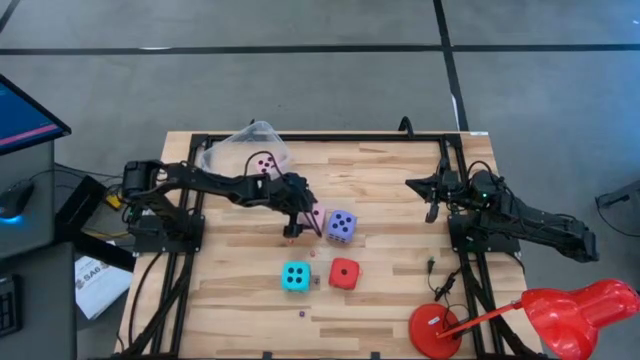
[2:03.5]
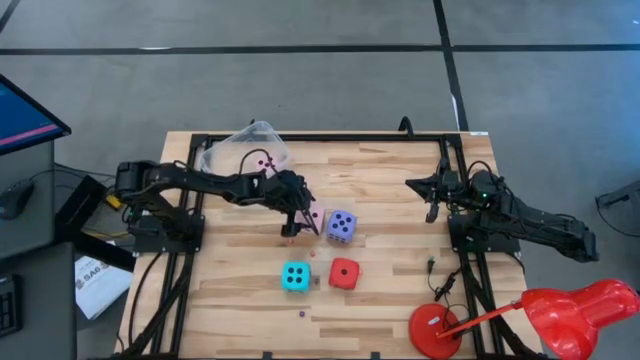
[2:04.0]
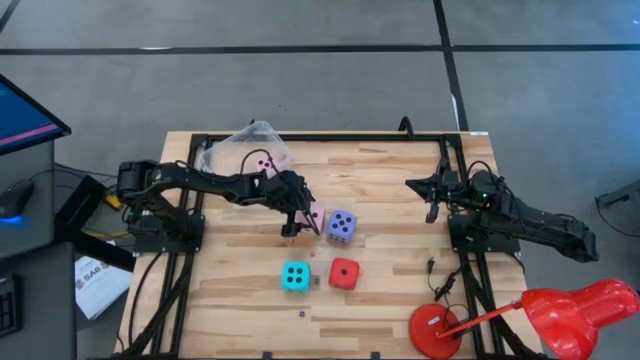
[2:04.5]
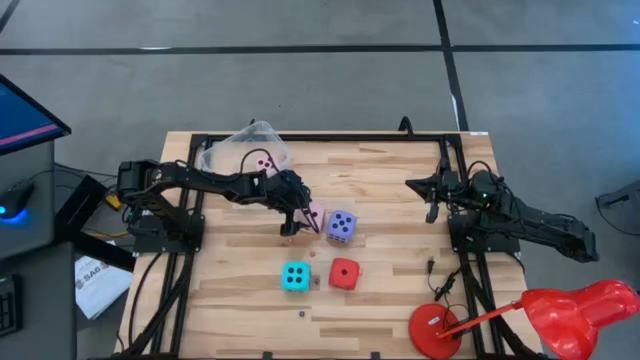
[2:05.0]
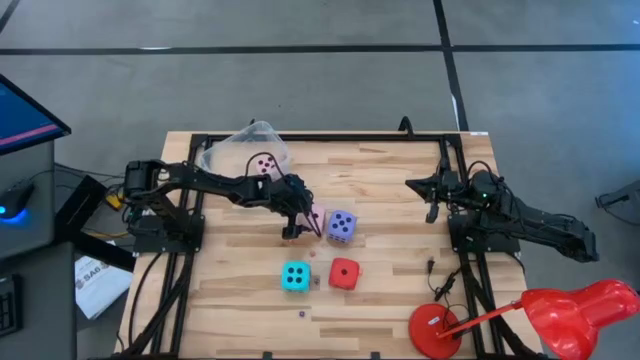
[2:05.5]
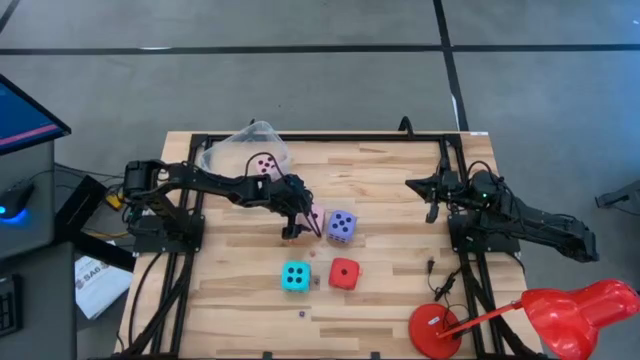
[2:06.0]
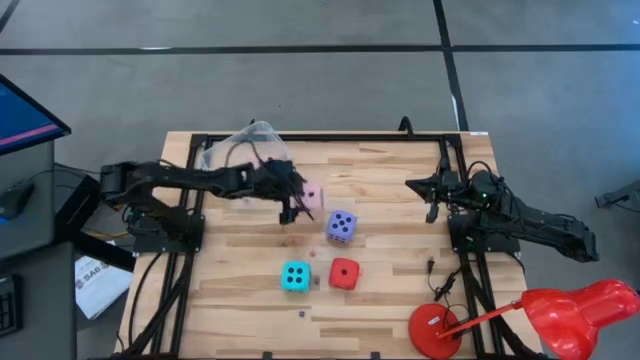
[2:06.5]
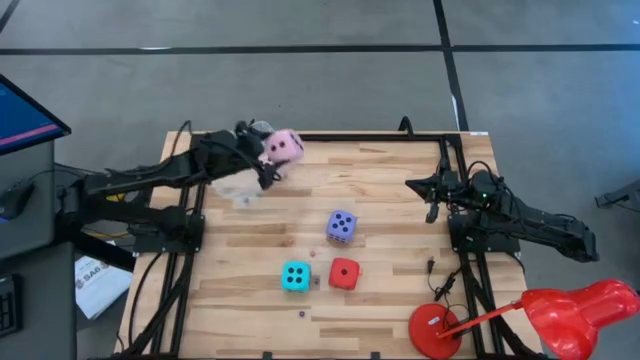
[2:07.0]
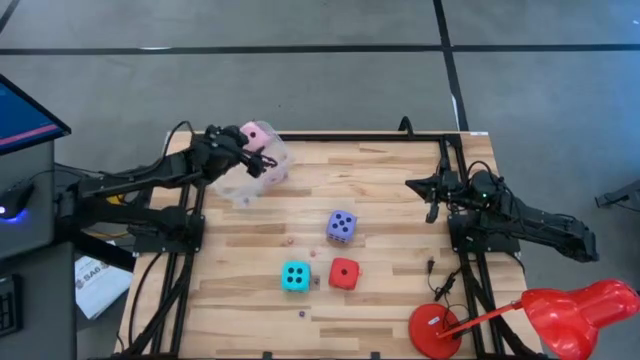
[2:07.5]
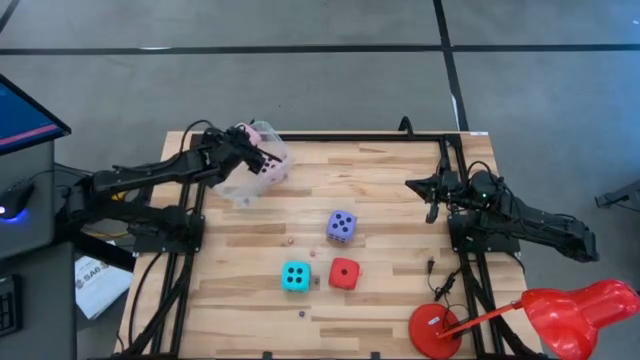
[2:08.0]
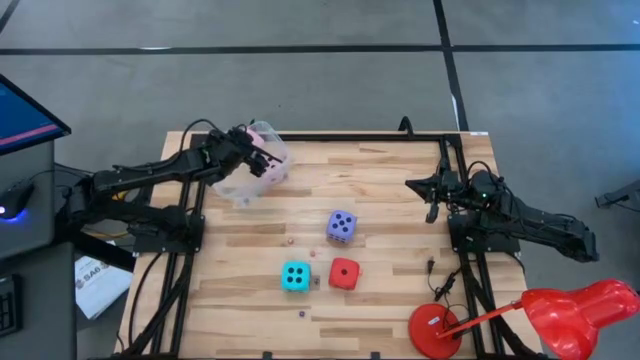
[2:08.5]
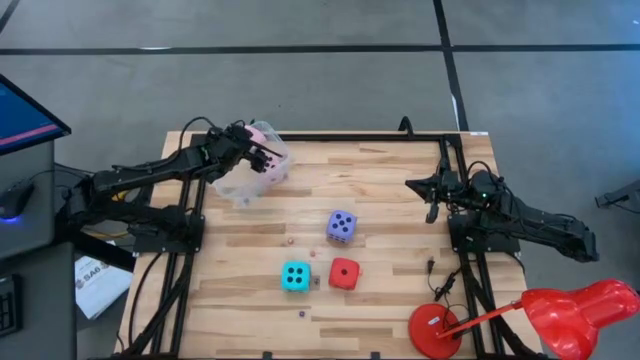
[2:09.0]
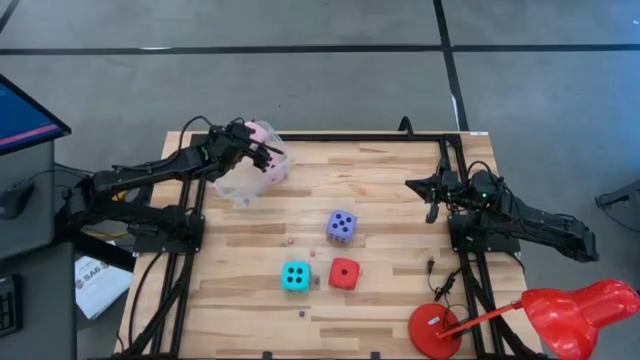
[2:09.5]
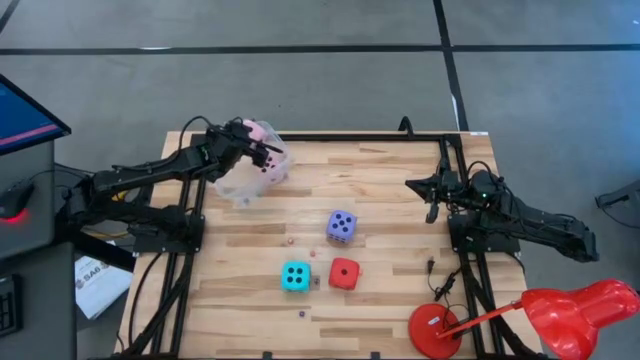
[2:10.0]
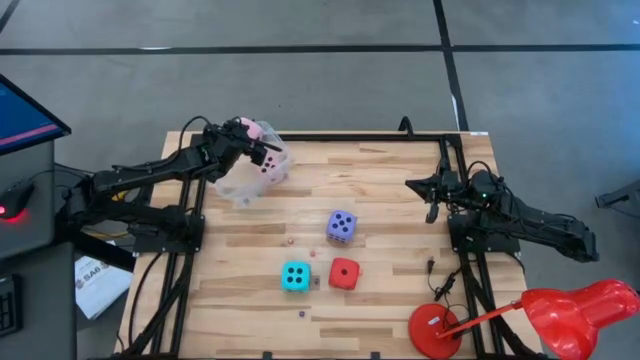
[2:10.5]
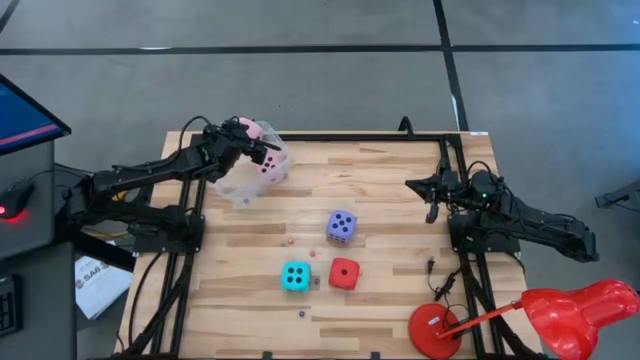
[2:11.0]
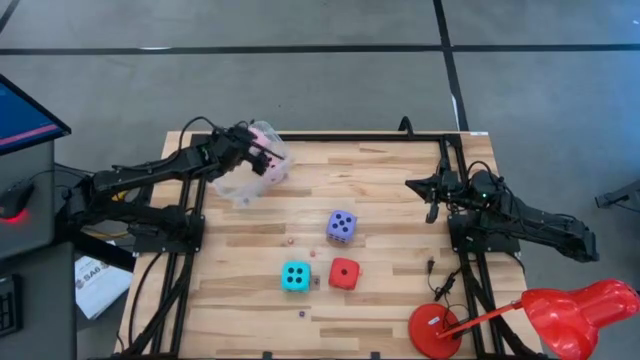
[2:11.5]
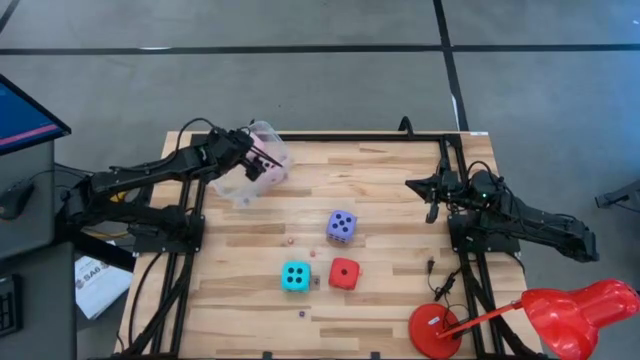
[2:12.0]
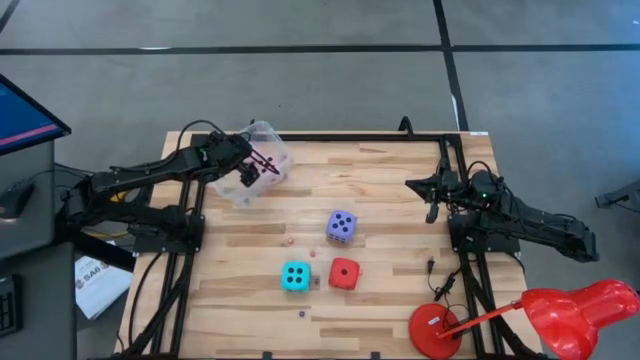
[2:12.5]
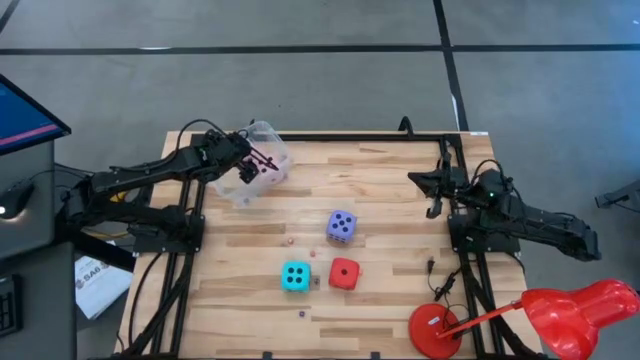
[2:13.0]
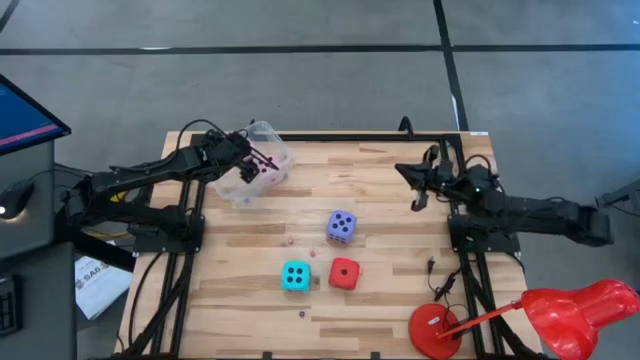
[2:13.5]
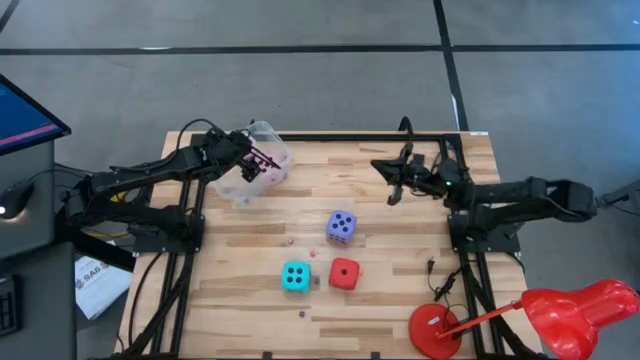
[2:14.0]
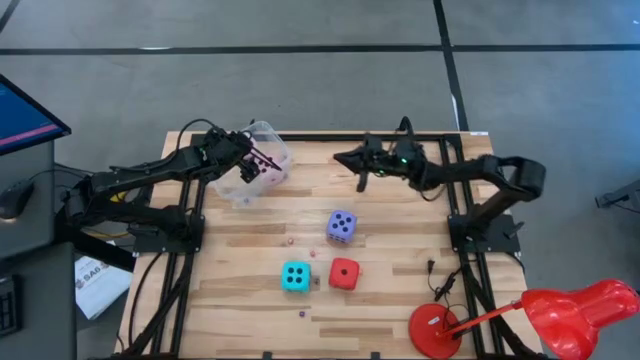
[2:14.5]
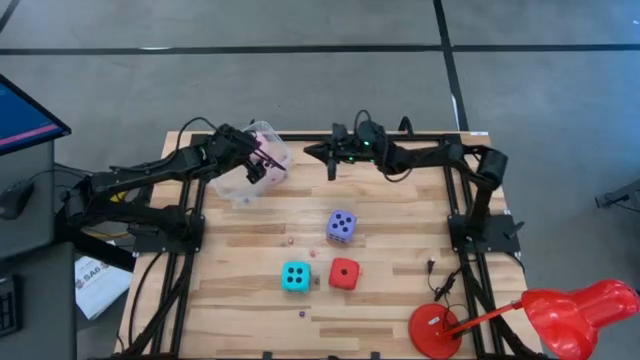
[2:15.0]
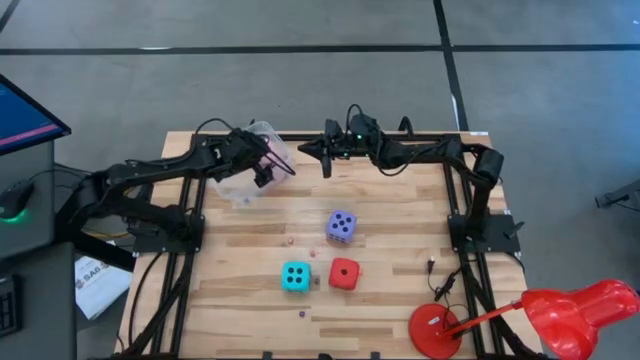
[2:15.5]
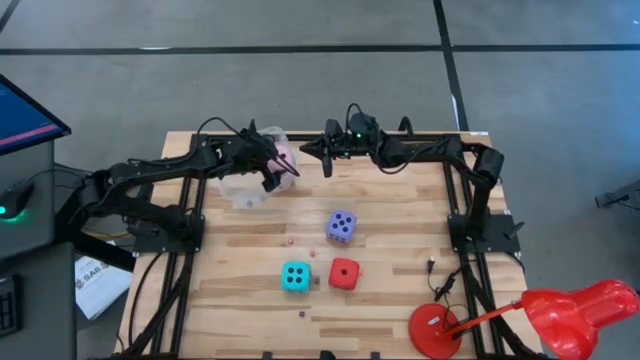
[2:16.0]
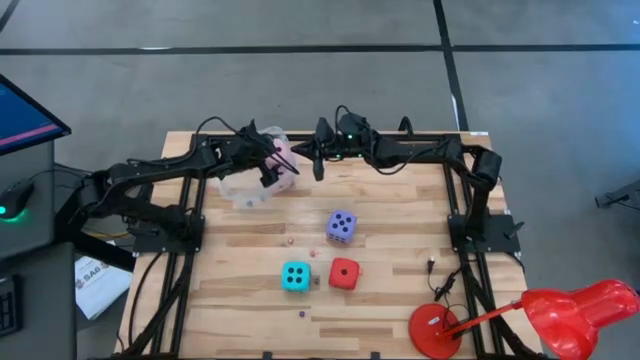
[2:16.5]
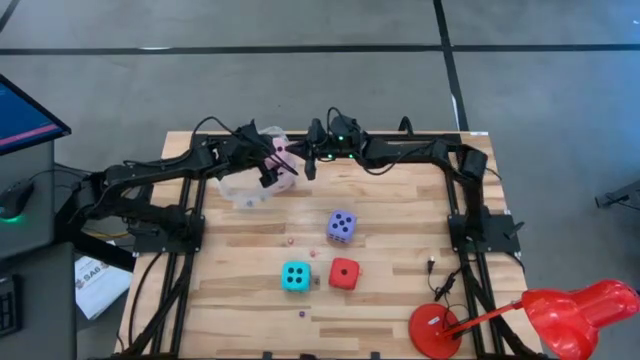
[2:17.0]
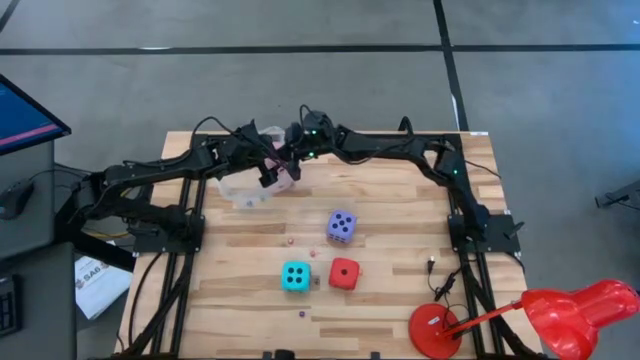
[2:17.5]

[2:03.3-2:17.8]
Task: Pick & Place Dice
Put the large pink dice into the transparent container

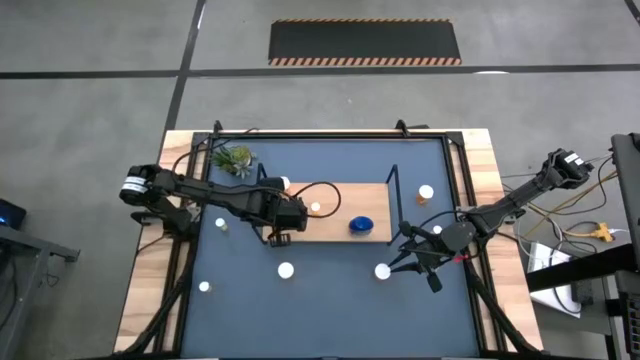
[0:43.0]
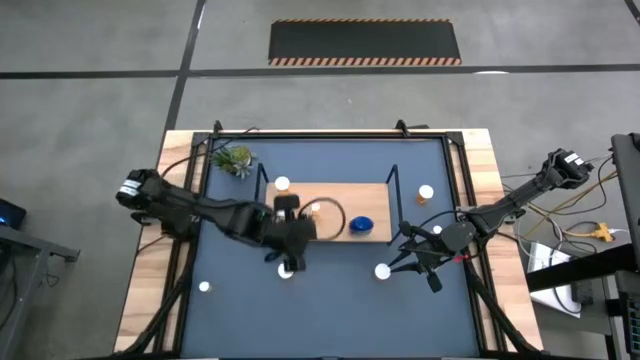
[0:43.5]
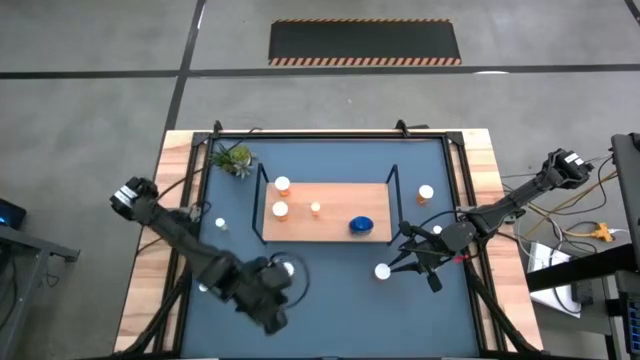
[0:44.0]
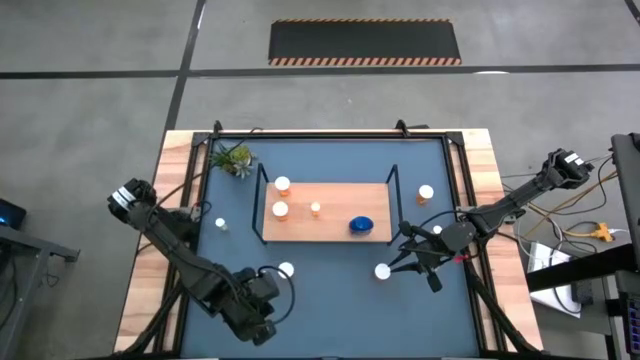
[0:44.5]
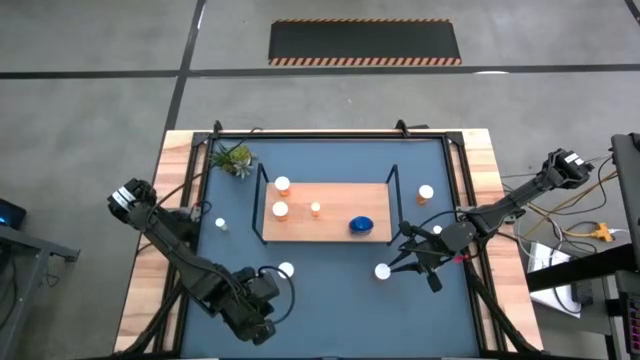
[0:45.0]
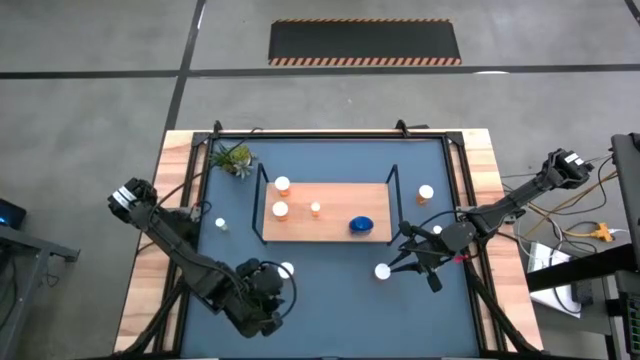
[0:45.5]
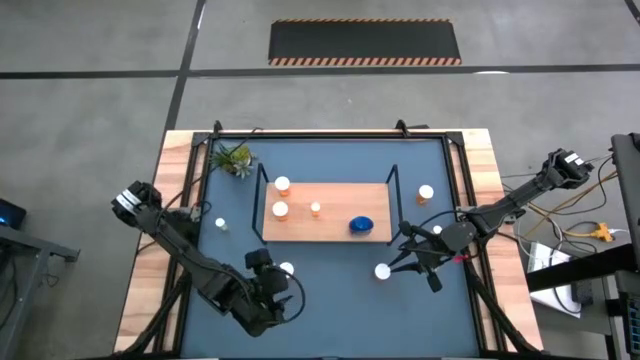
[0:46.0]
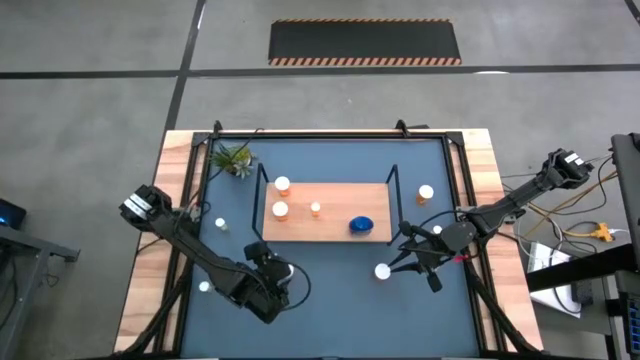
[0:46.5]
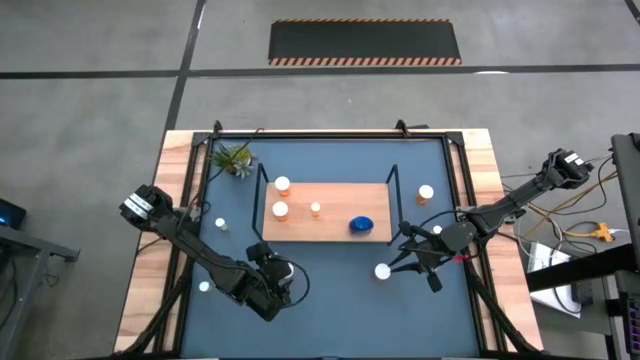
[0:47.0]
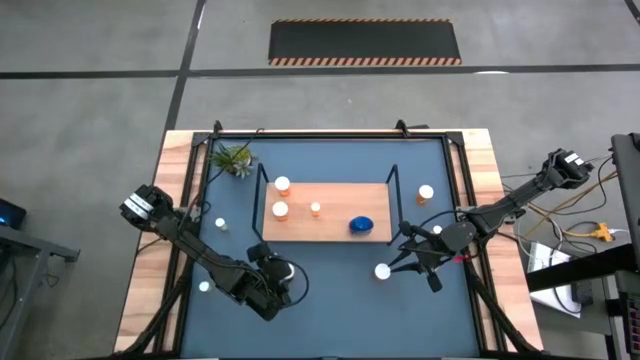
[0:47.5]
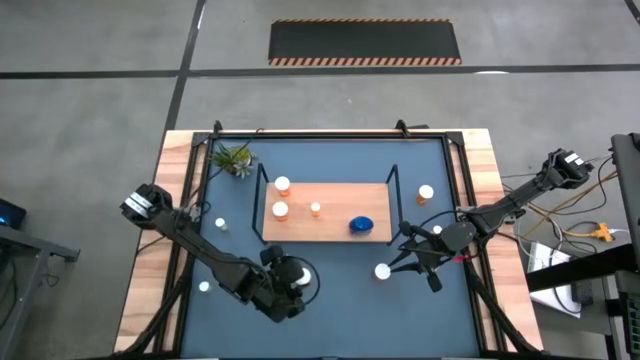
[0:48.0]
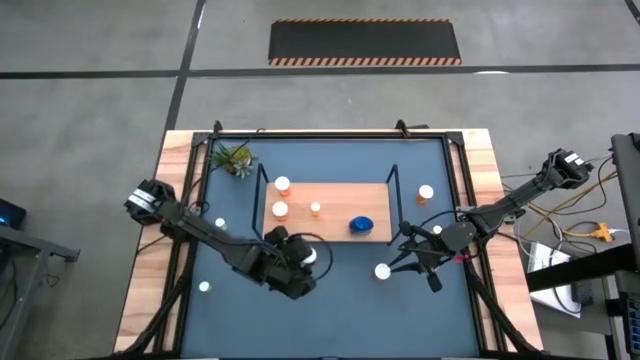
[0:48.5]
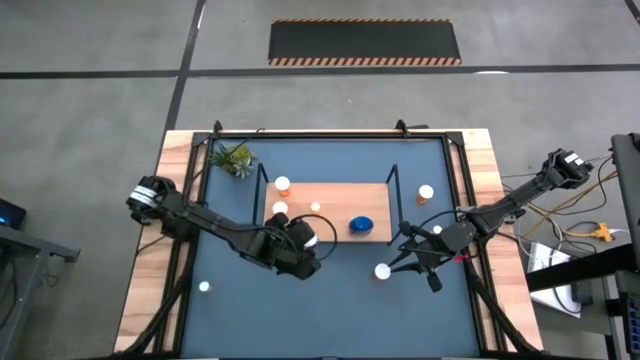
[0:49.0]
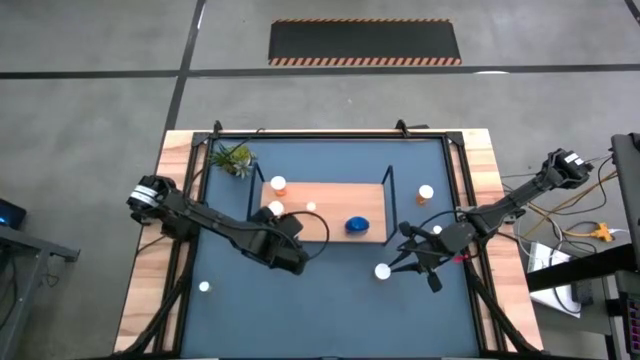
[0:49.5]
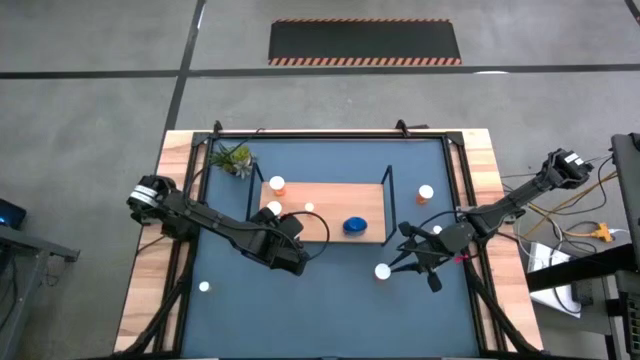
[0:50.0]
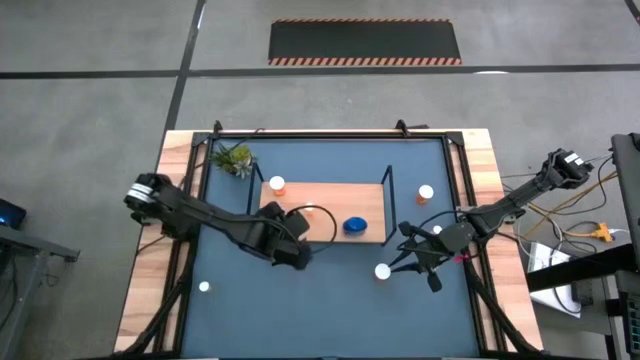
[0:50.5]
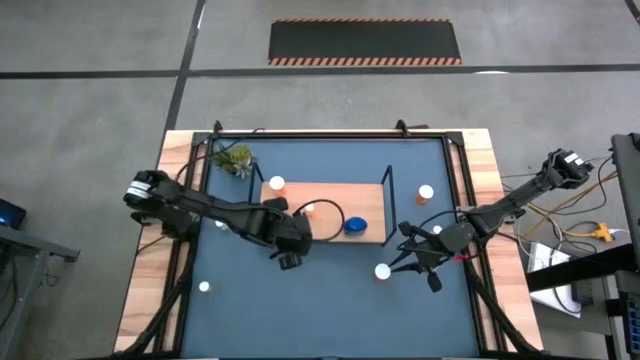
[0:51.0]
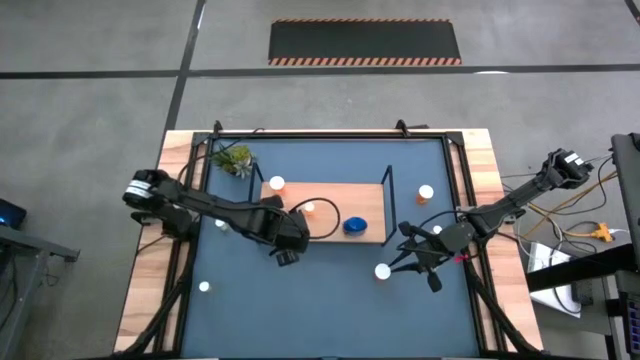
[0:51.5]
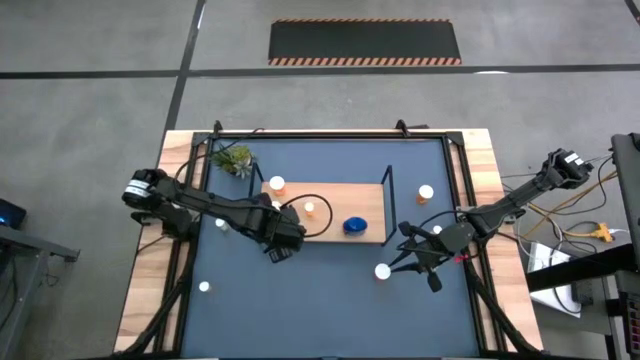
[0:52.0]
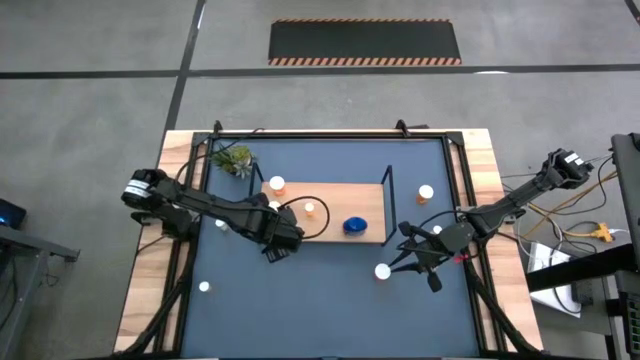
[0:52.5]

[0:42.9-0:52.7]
Task: Pick and place medicine bottles onto shelf by color
Put the big orange pill bottle on to the shelf aligned with the other big orange pill bottle
